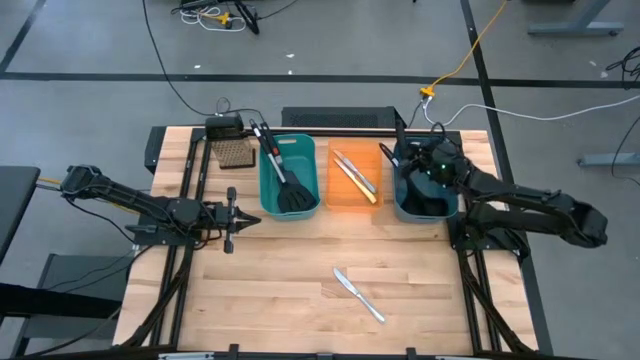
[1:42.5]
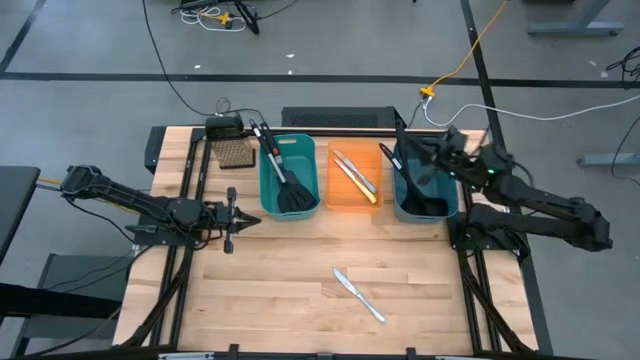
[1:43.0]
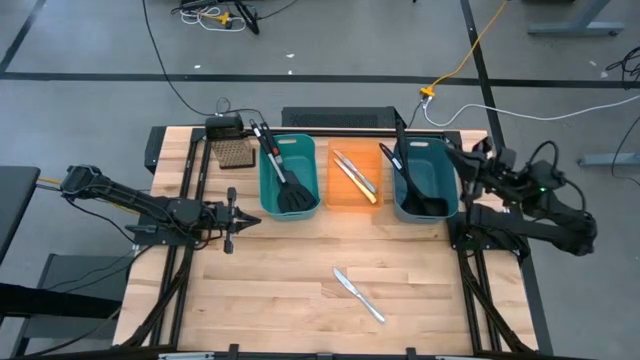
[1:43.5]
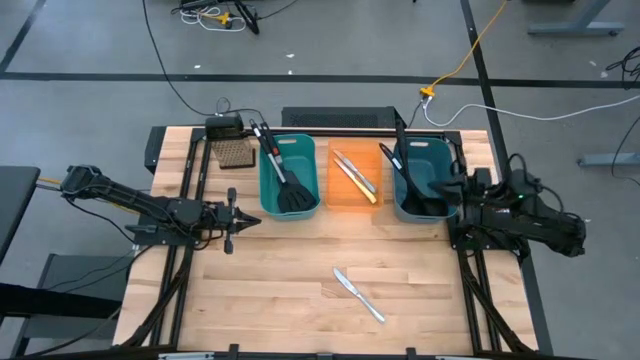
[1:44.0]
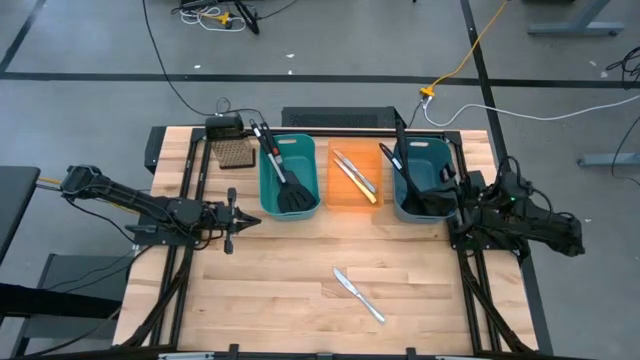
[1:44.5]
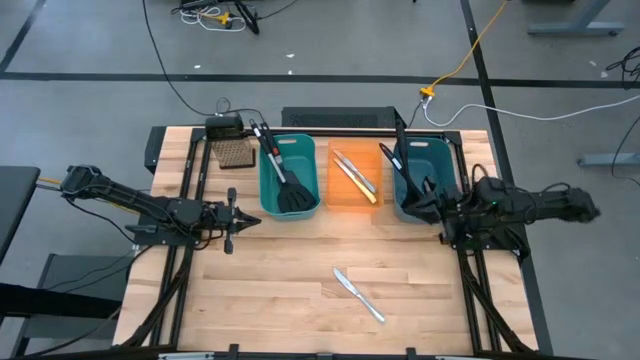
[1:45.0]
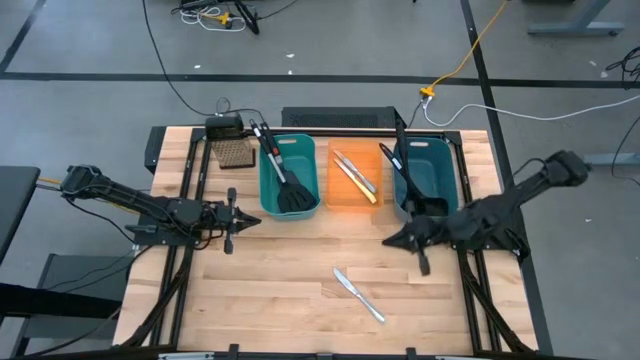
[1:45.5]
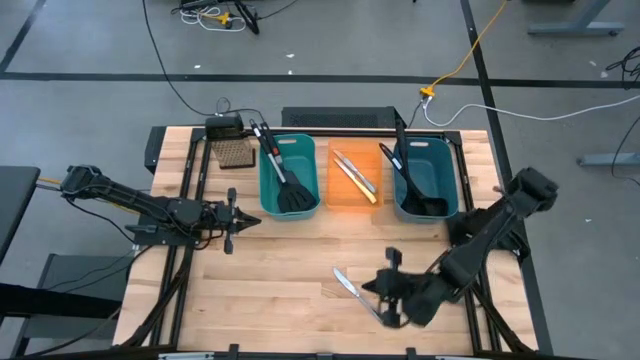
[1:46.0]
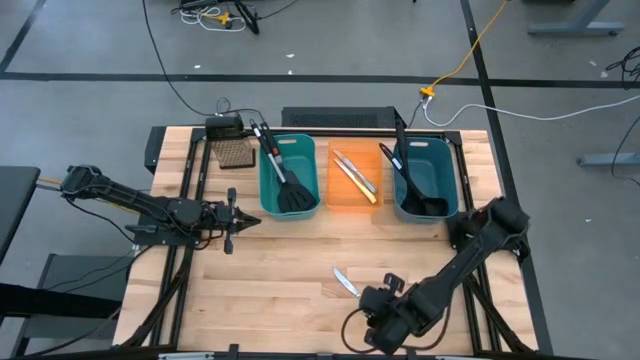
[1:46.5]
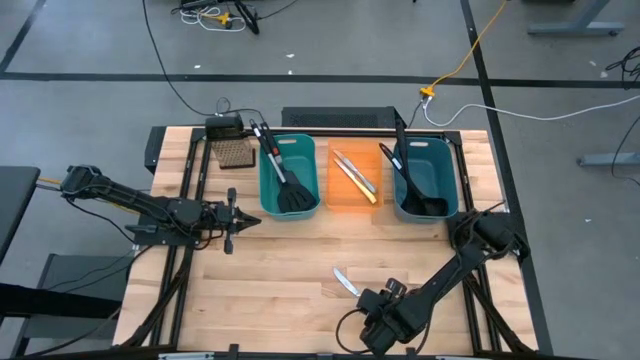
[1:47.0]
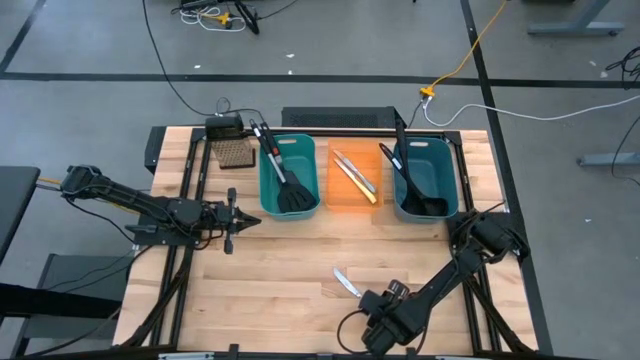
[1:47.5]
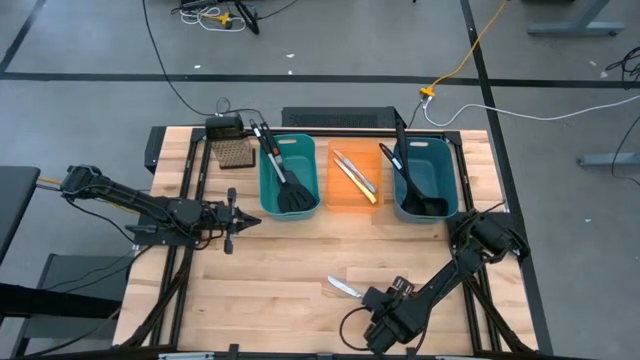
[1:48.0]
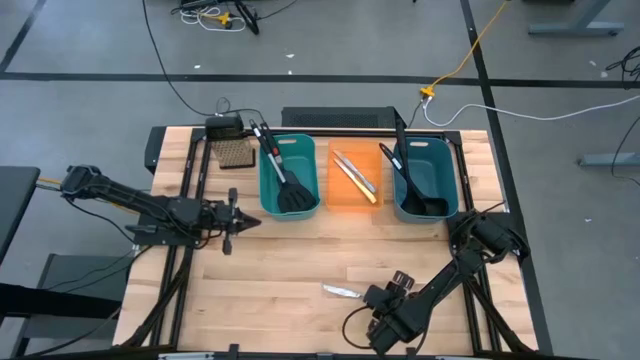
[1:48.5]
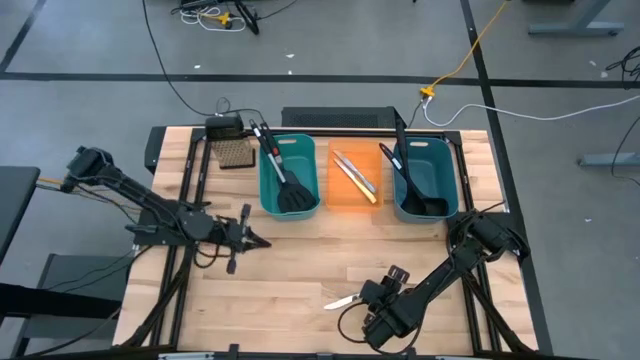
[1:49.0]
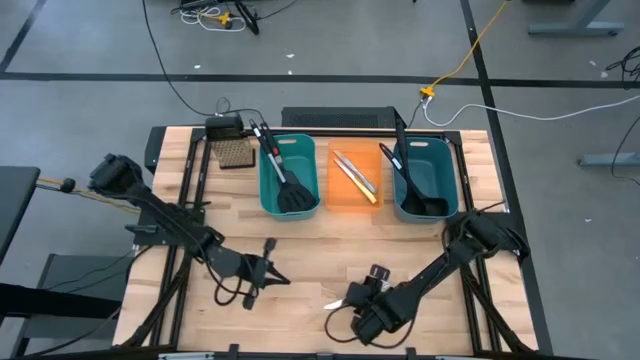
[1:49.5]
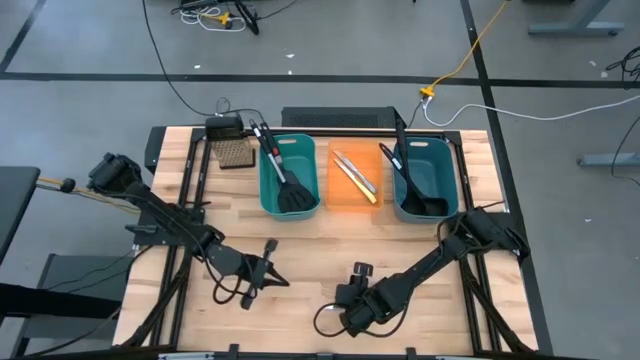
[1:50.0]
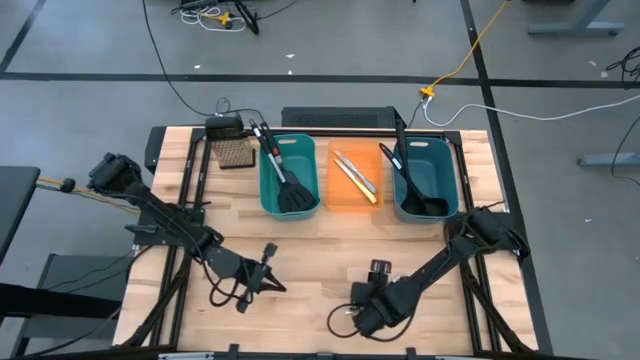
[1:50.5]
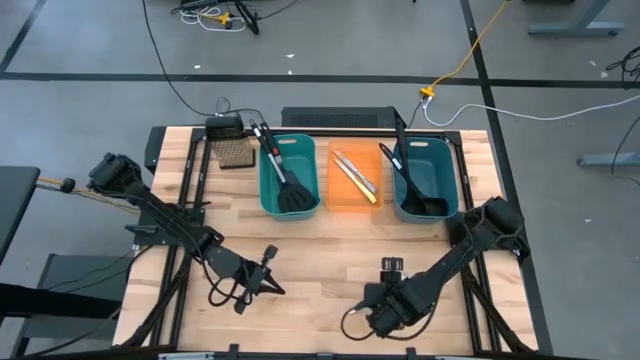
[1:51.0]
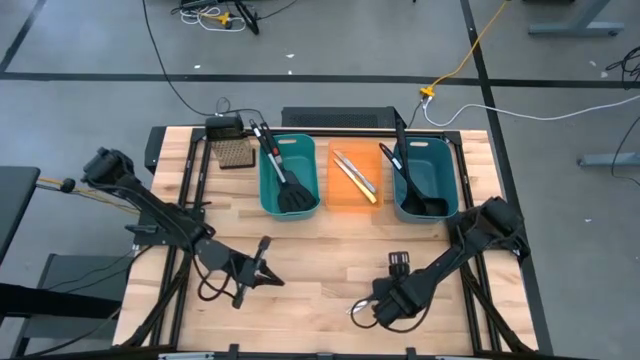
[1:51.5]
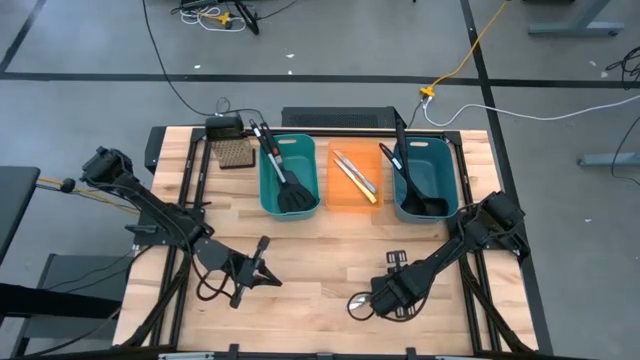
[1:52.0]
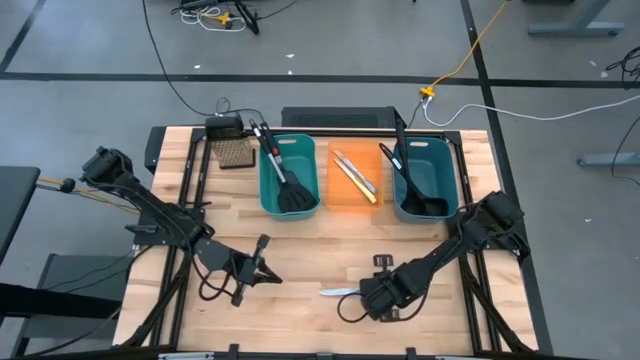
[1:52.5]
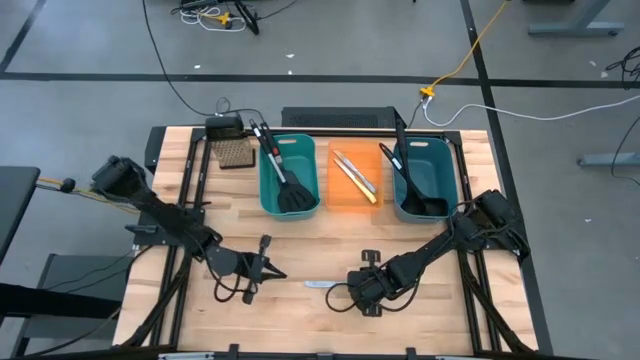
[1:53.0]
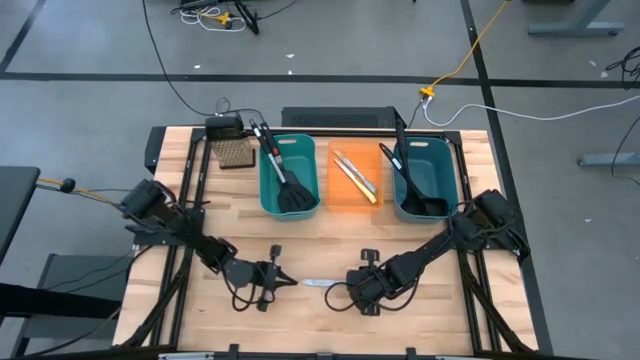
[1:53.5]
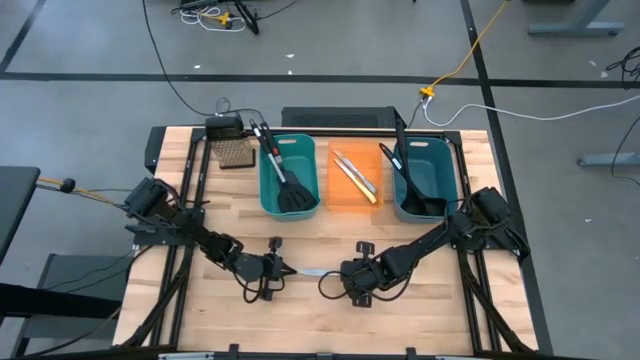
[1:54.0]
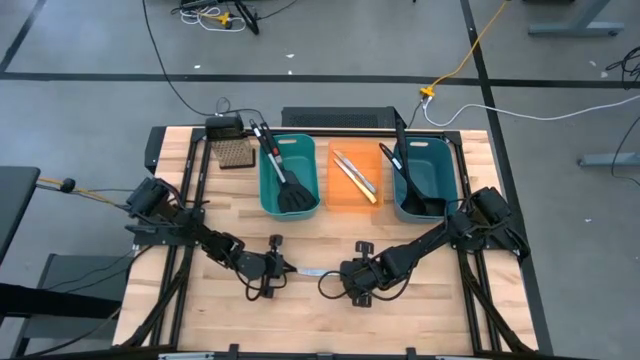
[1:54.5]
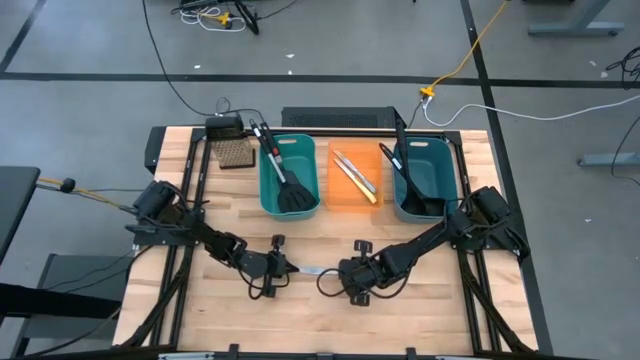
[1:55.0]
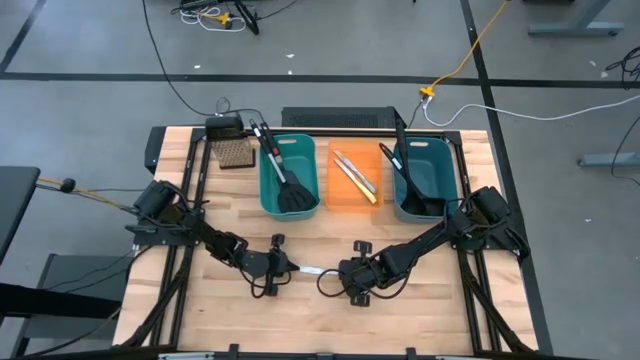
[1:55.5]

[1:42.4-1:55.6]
Task: Pick & Place Kitchen Items
Put the silver knife into the orange container

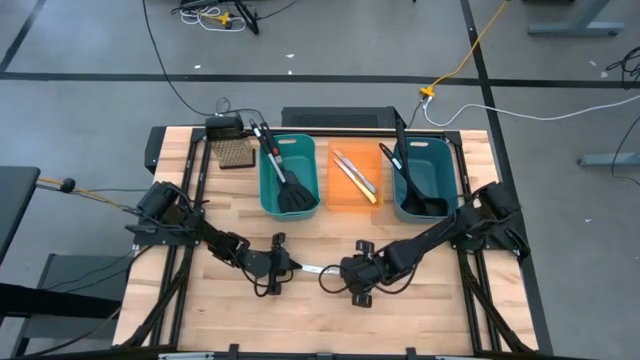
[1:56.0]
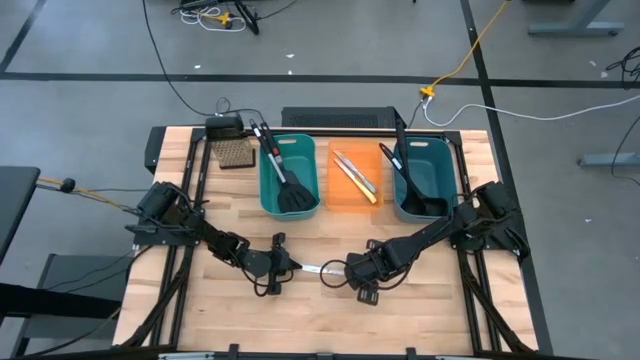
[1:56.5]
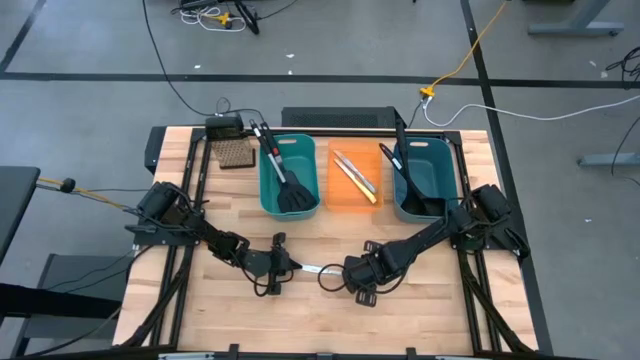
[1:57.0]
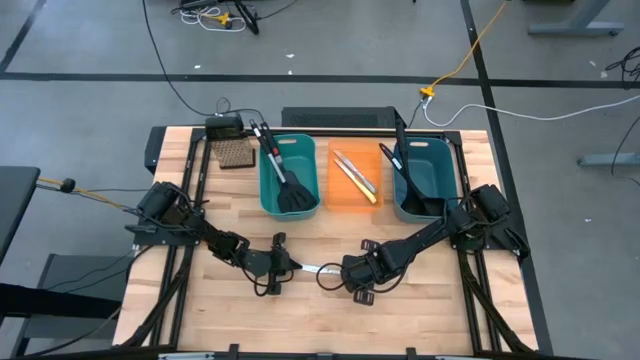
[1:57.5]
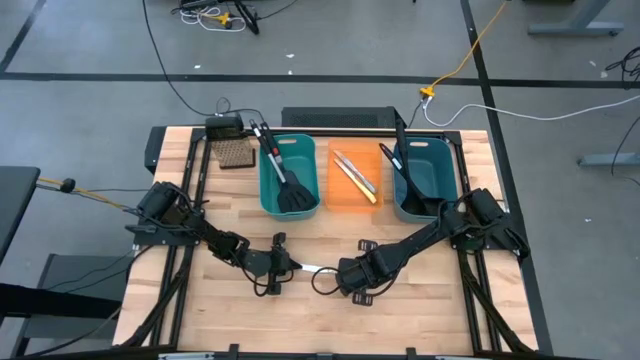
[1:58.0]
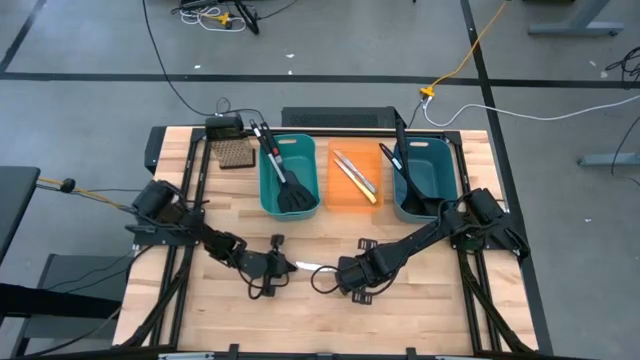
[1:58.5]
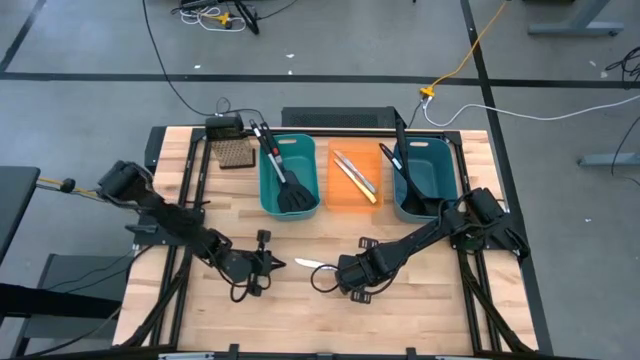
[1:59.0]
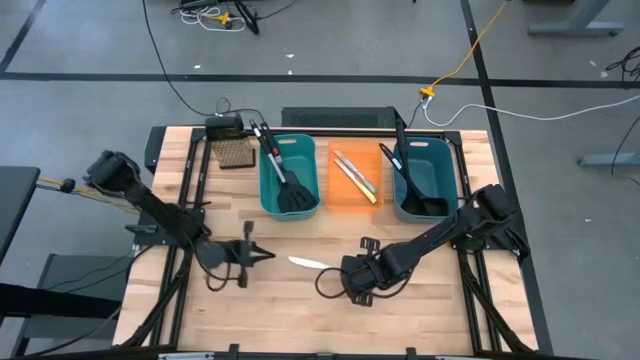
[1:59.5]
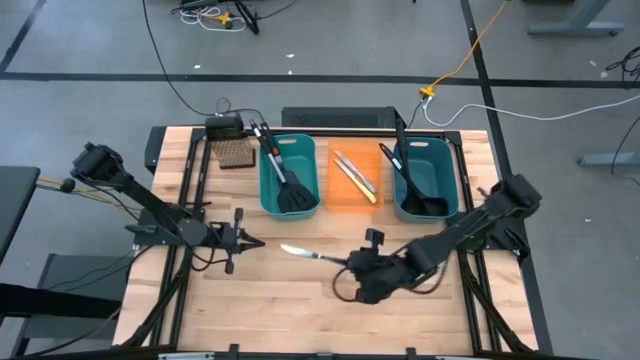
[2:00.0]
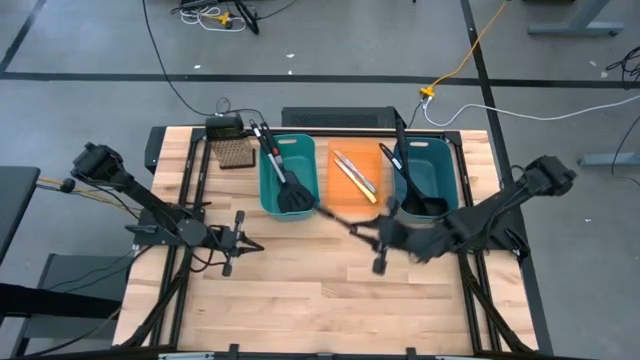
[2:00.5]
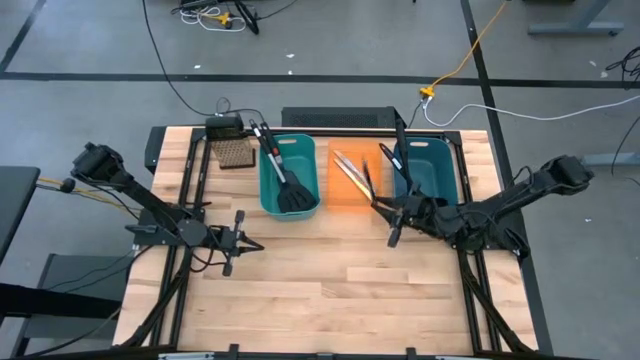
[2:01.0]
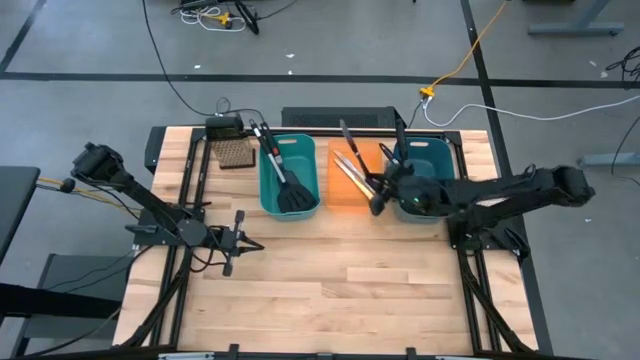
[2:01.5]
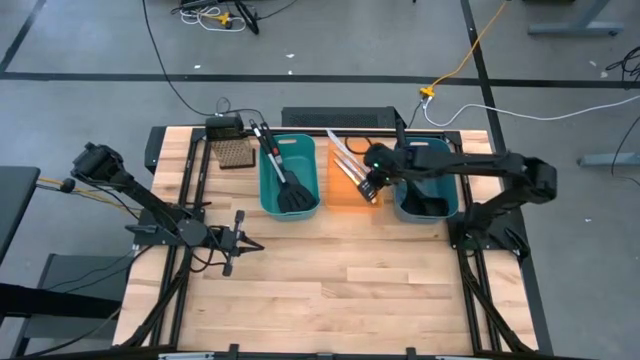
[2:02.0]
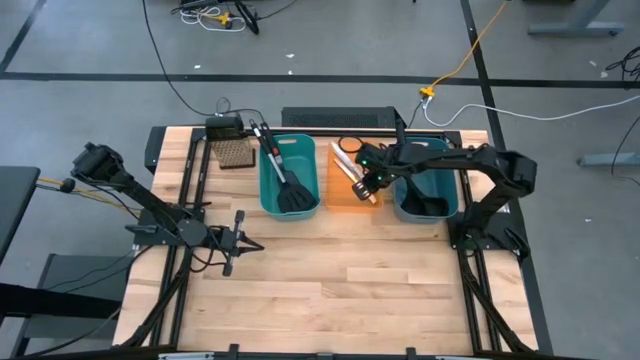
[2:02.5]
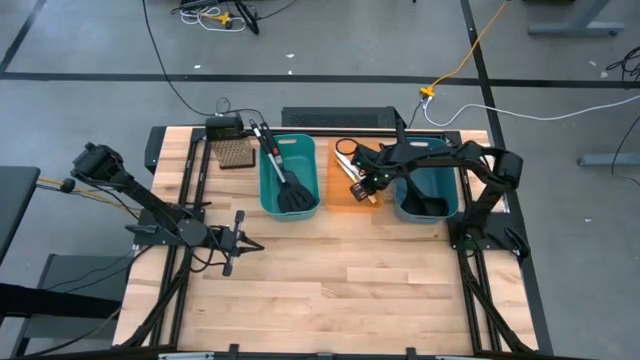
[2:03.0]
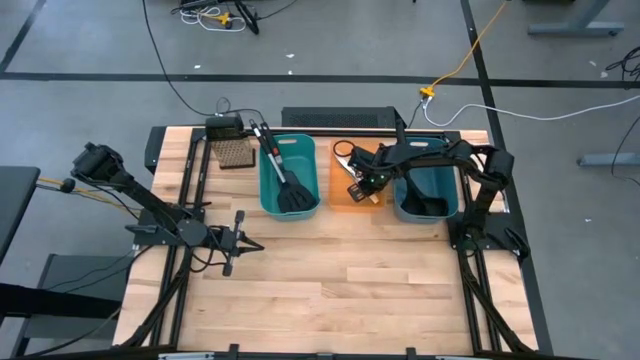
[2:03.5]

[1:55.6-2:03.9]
Put the silver knife into the orange container

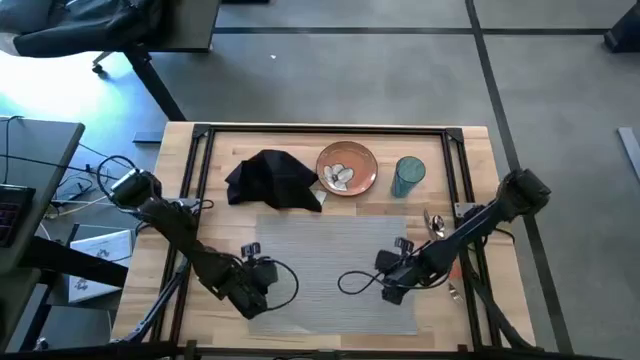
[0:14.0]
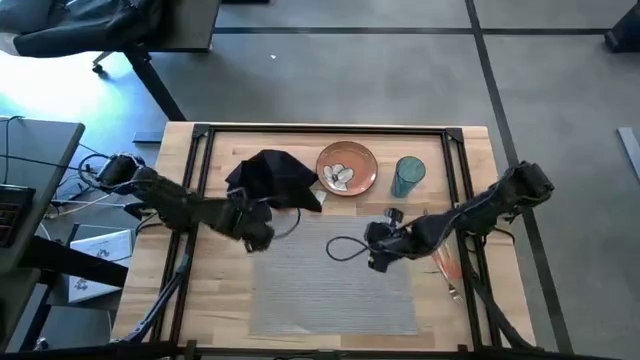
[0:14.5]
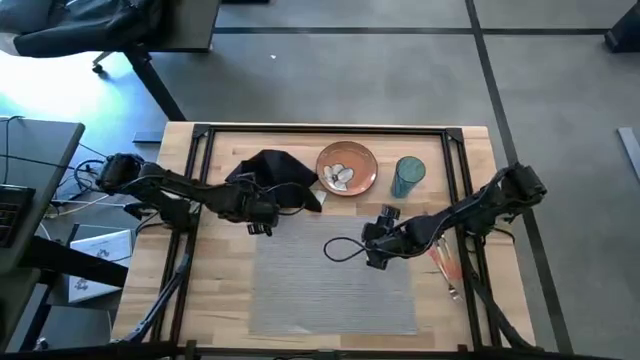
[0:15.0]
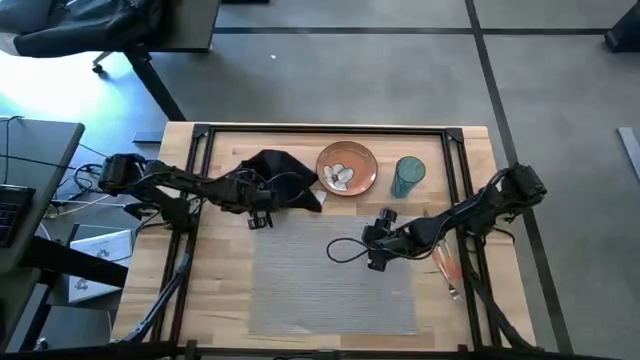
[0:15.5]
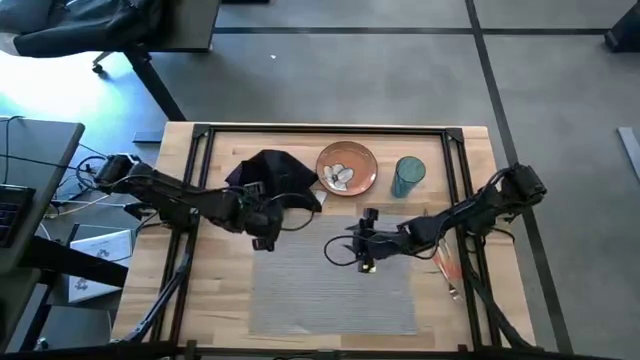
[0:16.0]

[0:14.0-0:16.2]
Task: Set table place
Fold the black table napkin on the gray tablemat
